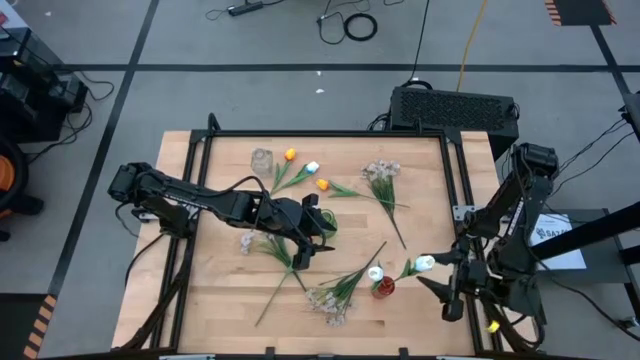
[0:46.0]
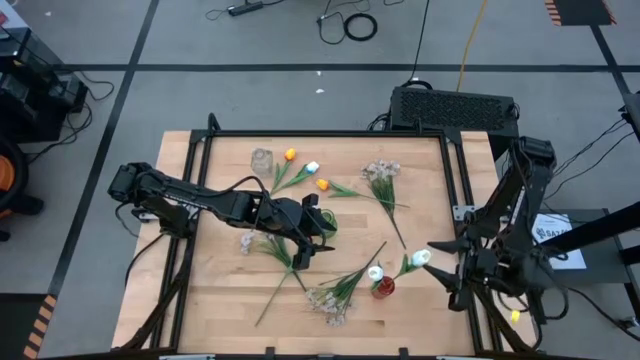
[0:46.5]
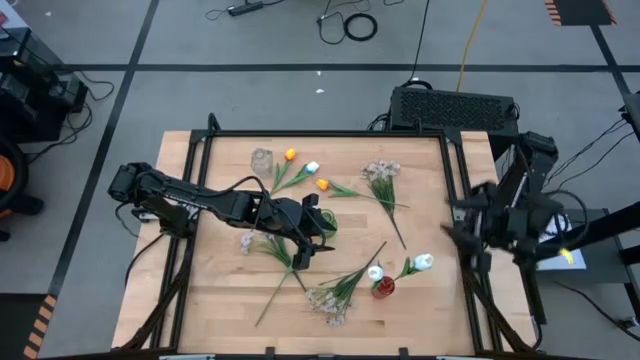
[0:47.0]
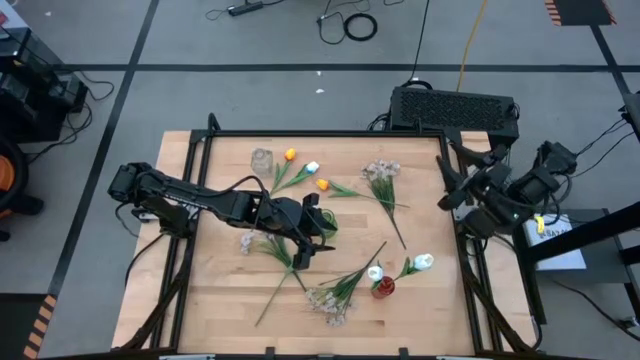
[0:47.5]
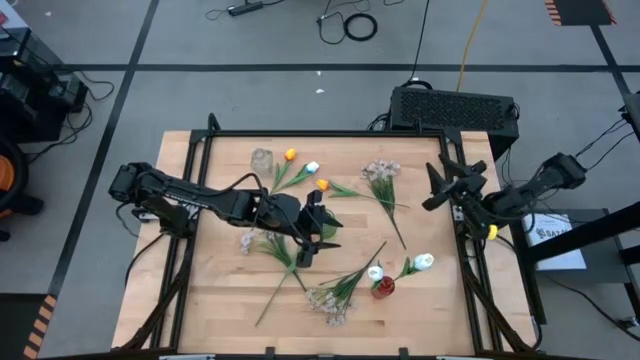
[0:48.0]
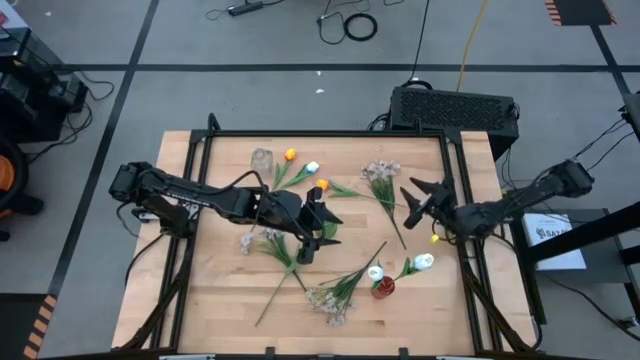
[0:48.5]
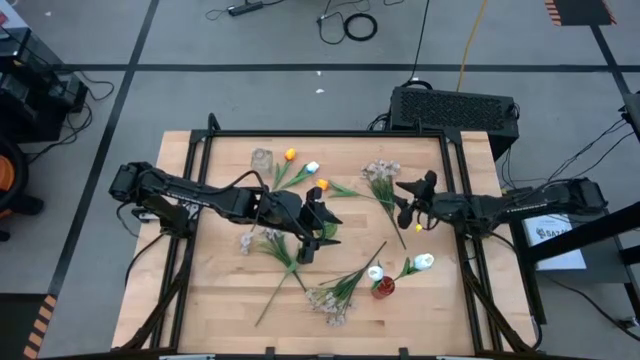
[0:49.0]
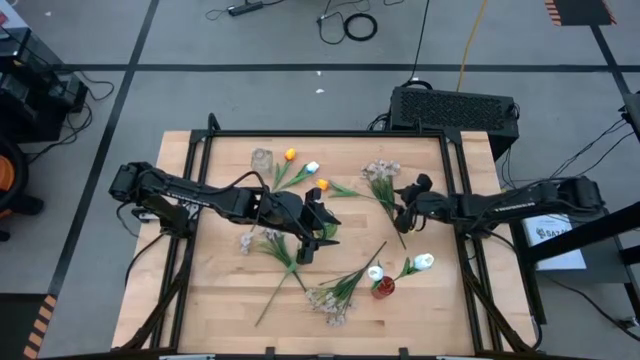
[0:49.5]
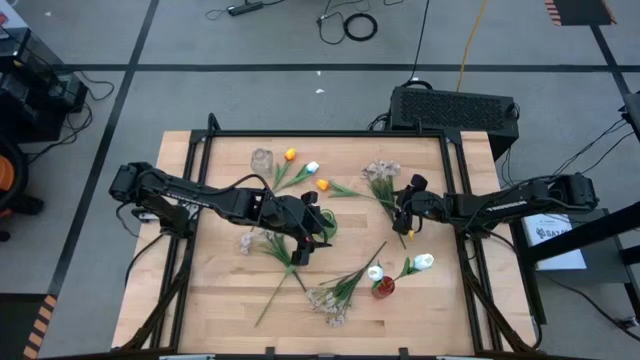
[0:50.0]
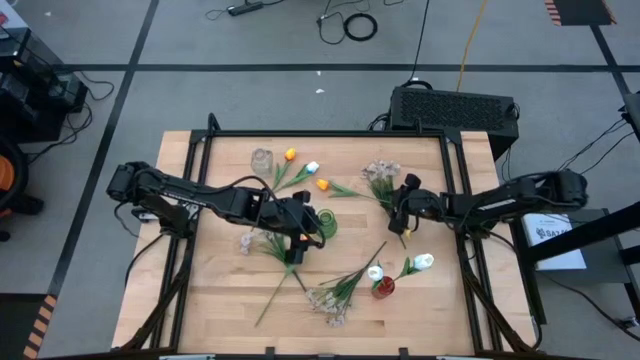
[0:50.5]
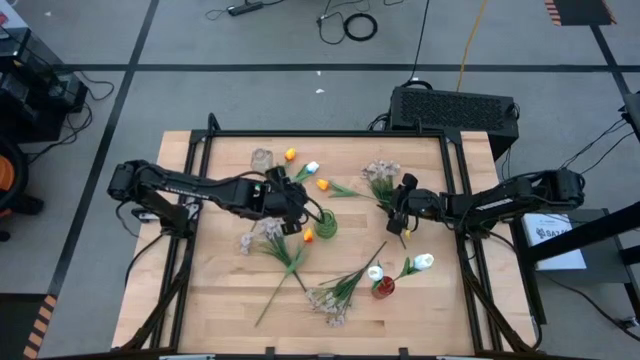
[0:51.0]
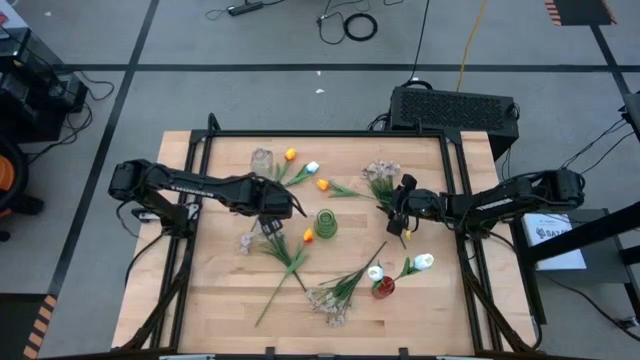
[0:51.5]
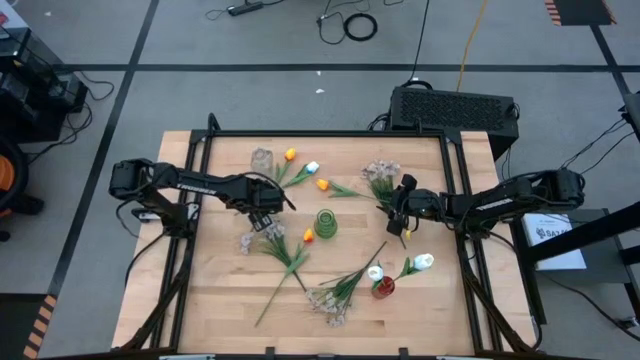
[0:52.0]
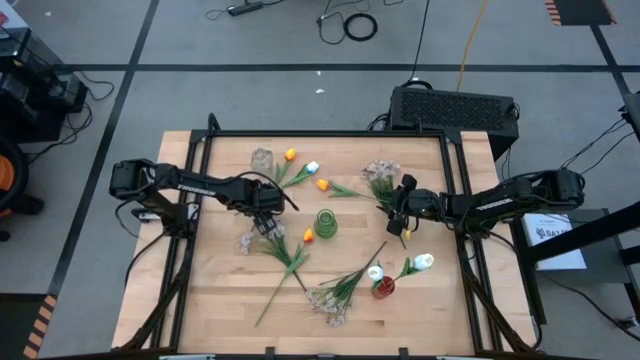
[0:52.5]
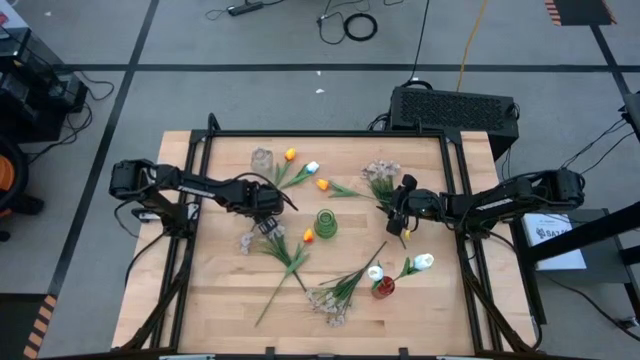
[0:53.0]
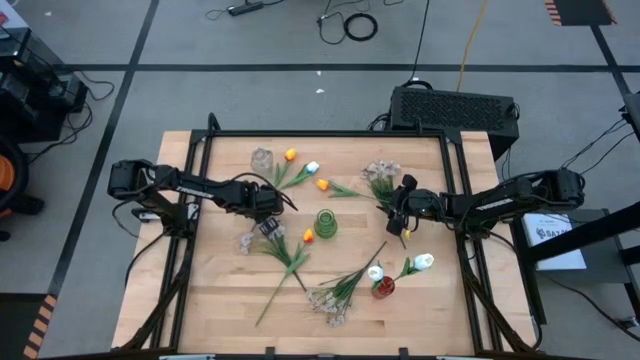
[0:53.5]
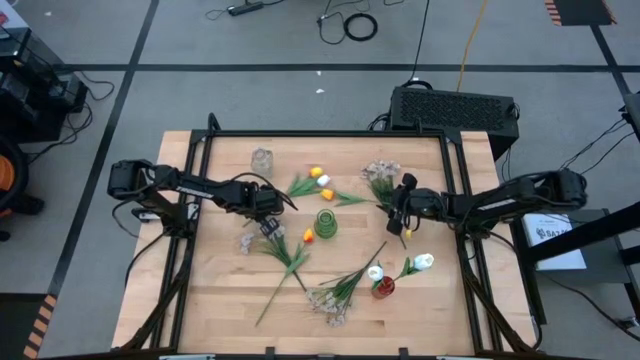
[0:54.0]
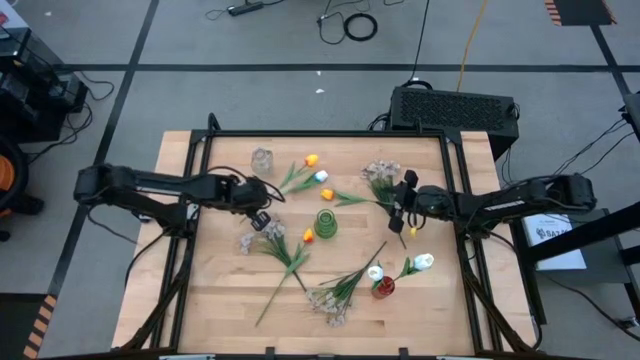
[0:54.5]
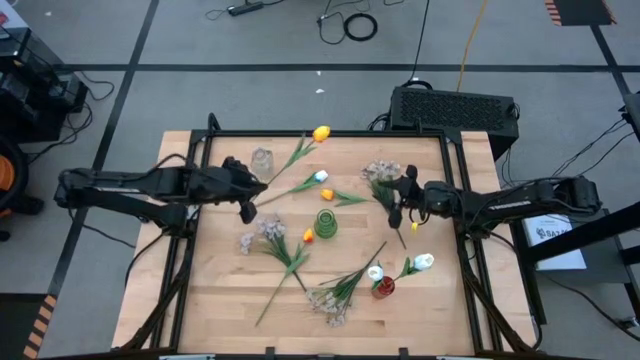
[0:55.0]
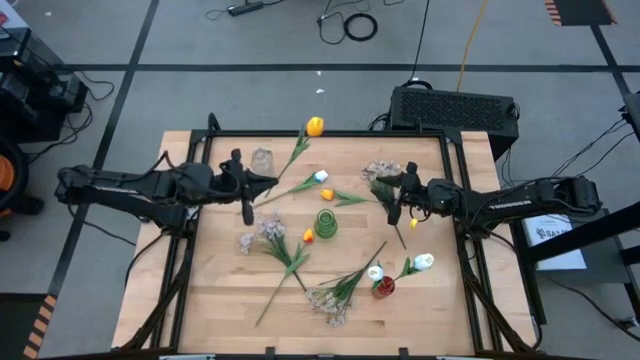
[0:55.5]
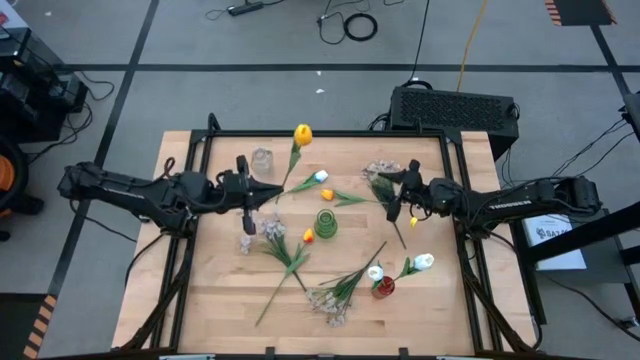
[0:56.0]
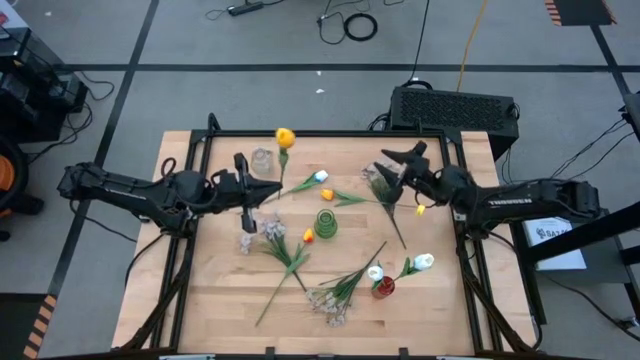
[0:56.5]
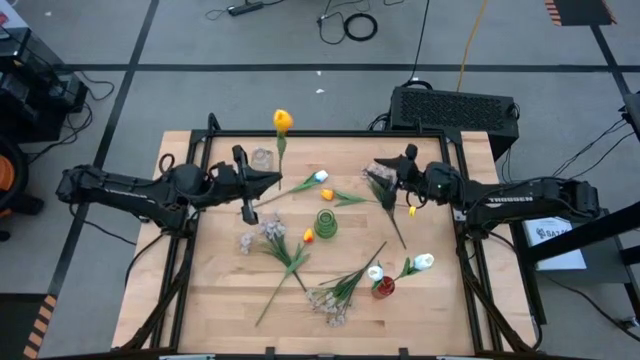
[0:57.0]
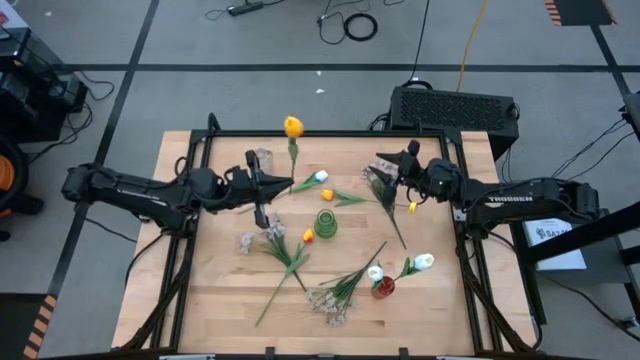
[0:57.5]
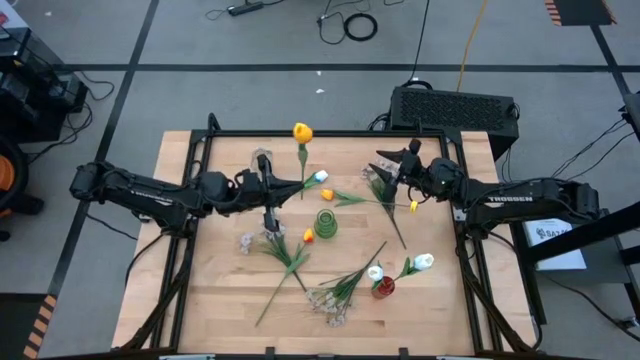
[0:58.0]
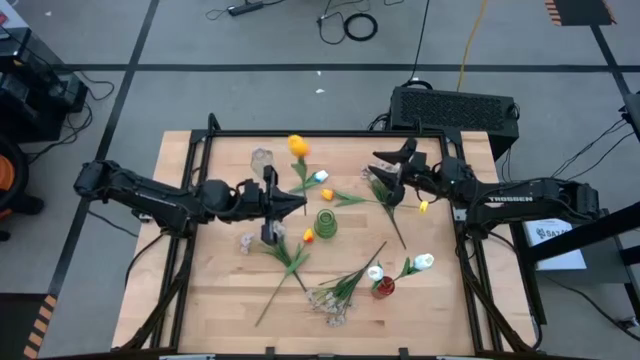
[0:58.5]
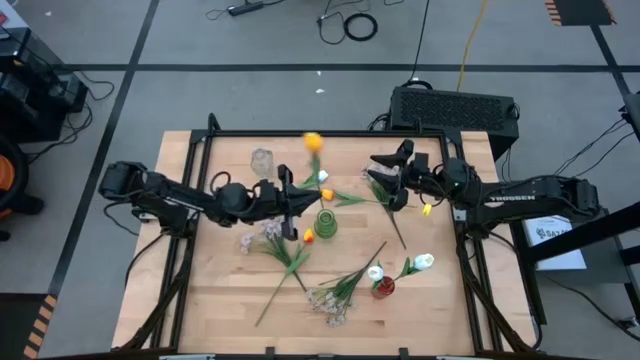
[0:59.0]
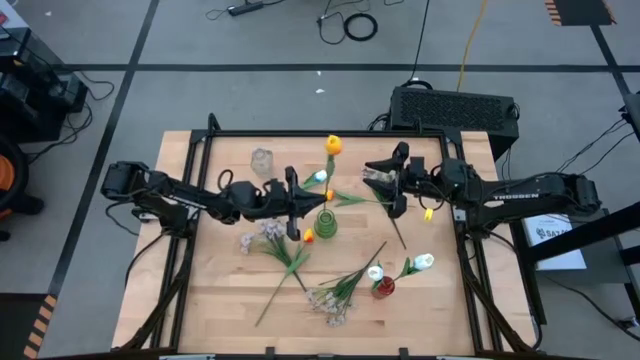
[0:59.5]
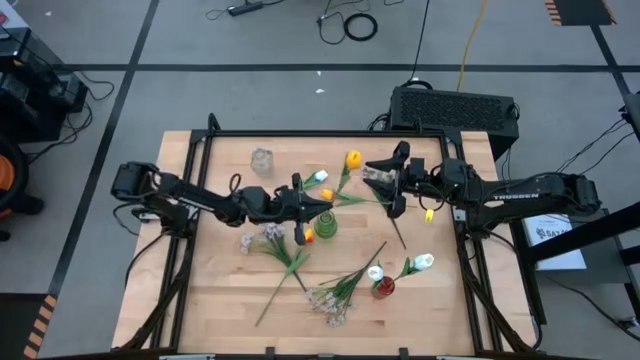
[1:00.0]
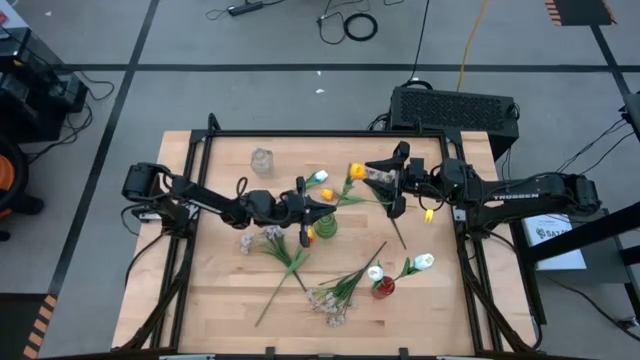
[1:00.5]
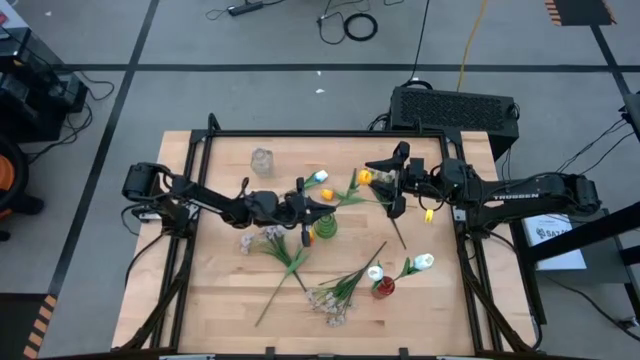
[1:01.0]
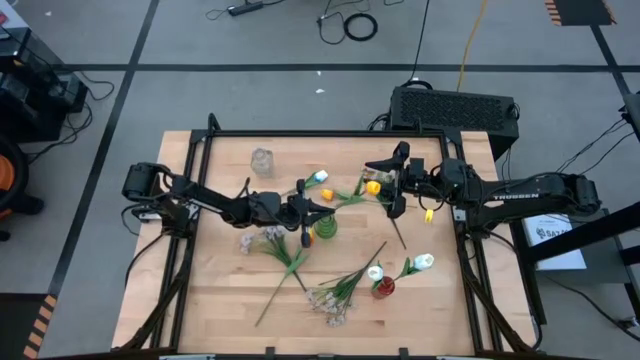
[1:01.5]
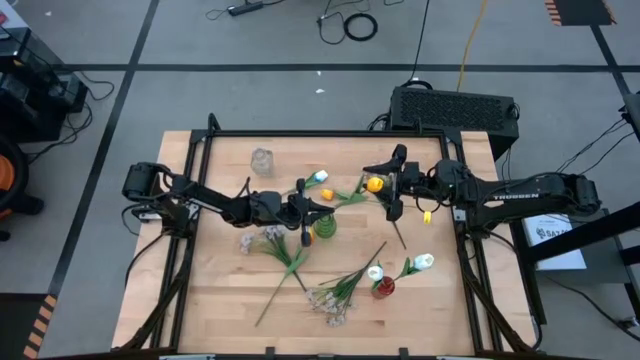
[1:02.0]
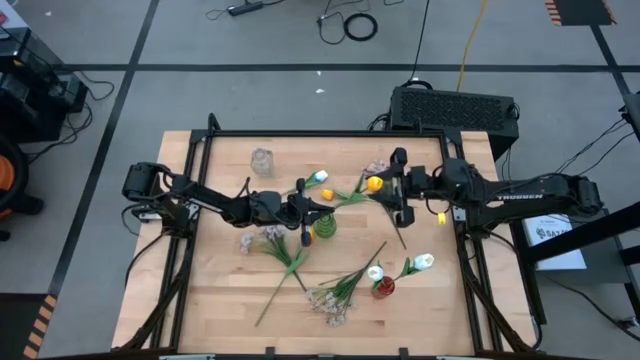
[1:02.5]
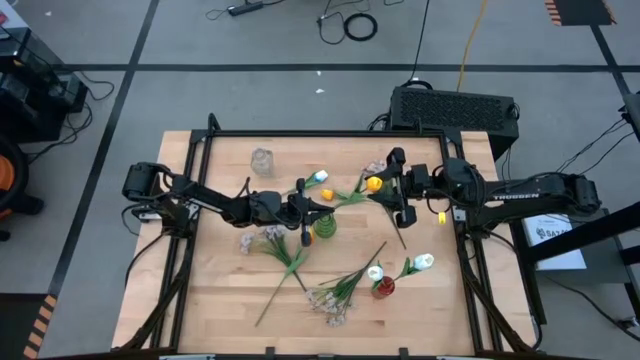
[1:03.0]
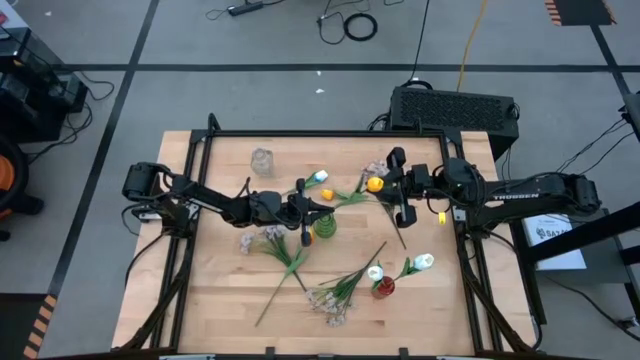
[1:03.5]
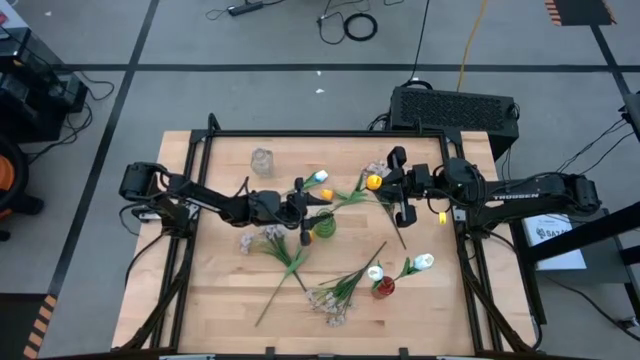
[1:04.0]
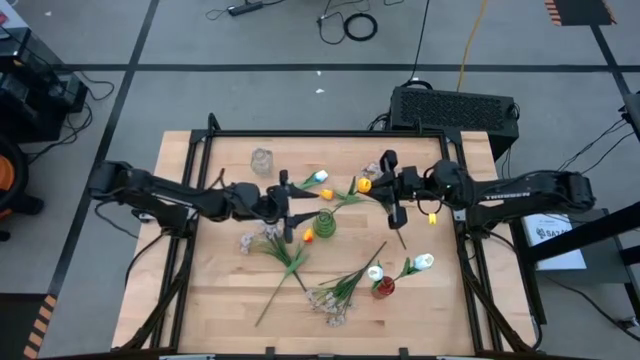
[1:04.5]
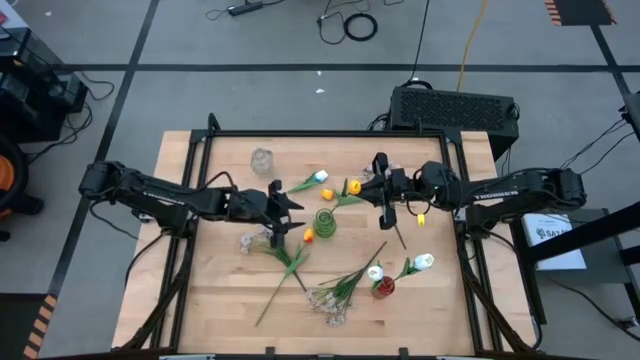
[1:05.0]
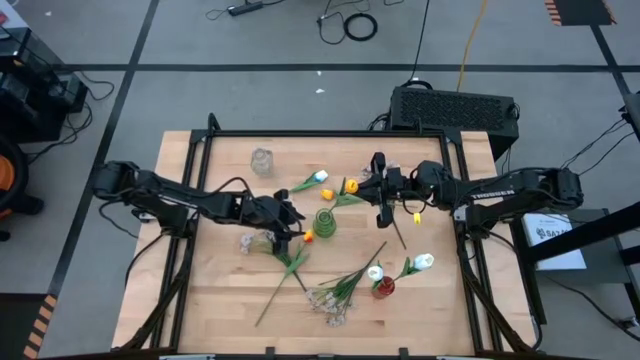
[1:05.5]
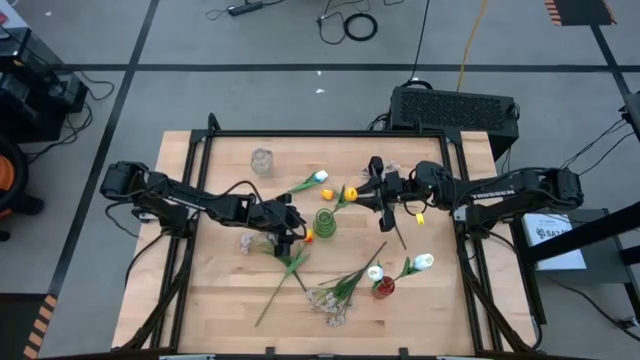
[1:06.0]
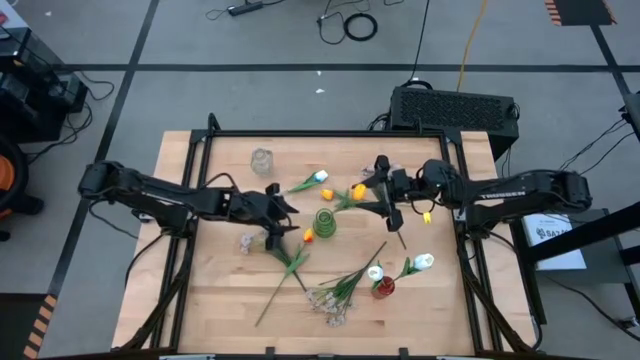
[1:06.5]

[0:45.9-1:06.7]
Task: Sort flowers into vase by color
Put the top left yellow tulip into the green vase

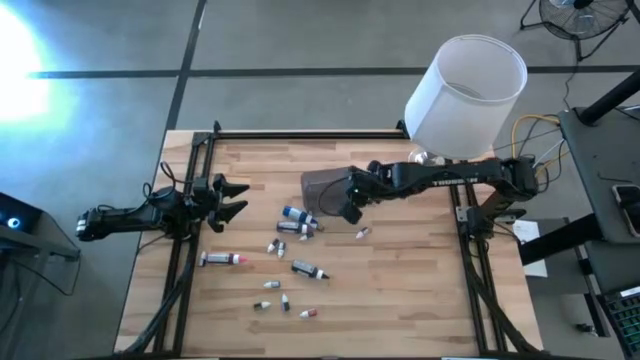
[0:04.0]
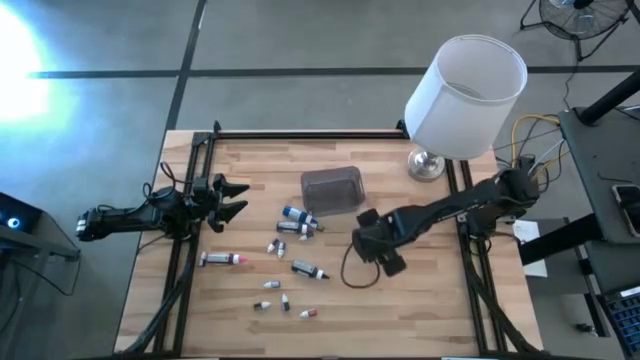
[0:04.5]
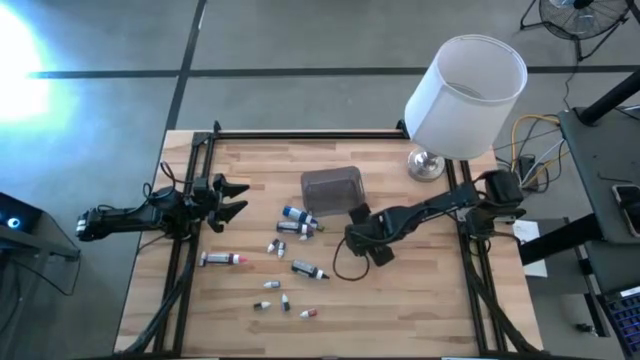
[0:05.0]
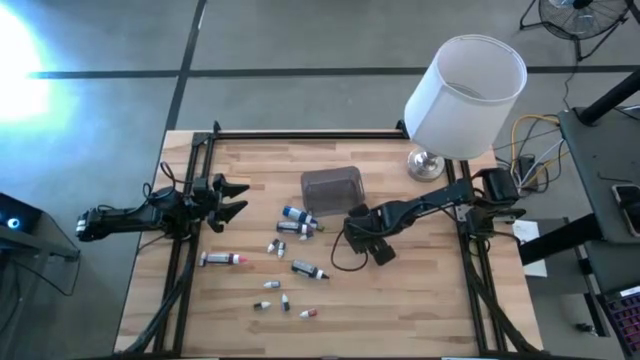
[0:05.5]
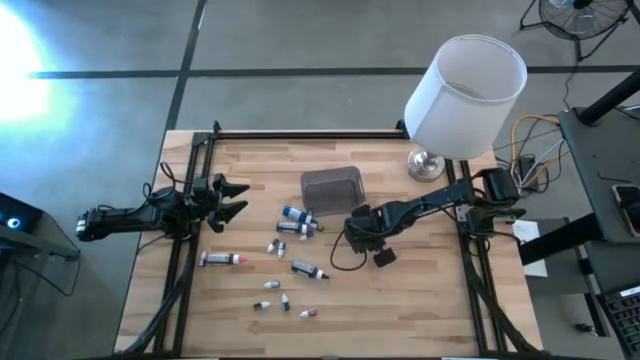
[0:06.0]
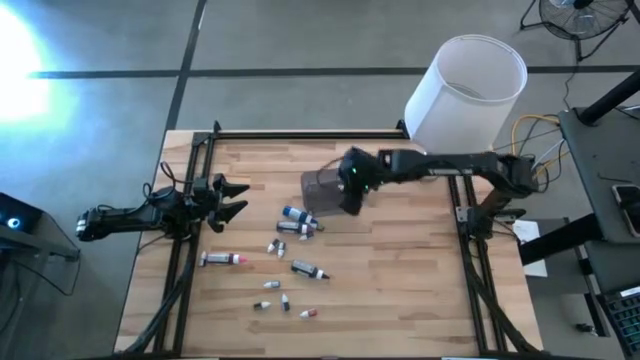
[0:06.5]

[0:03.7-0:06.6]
Task: Pick & Place food coloring
Put the small red food coloring bottle into the bin
